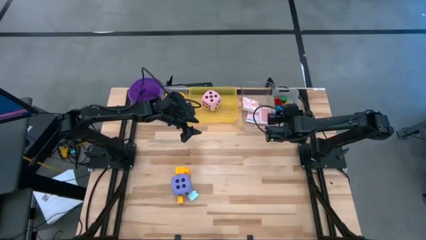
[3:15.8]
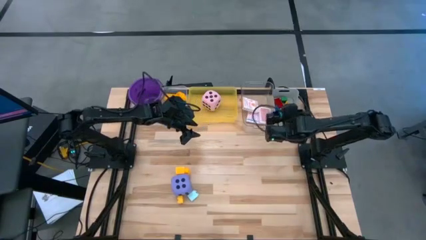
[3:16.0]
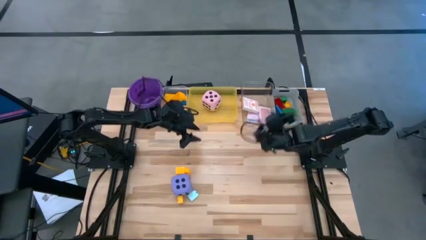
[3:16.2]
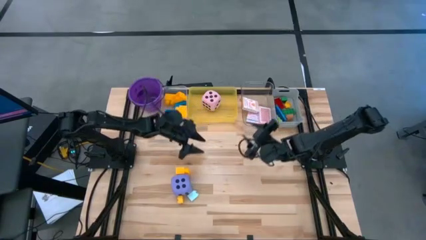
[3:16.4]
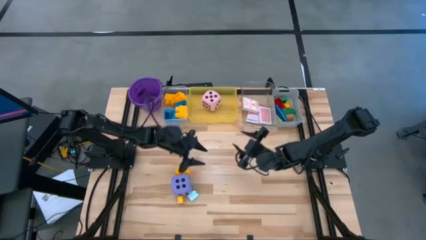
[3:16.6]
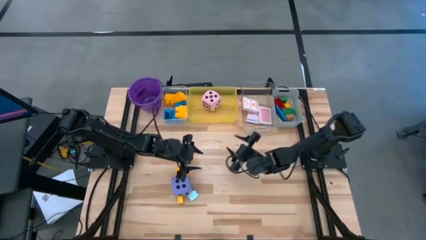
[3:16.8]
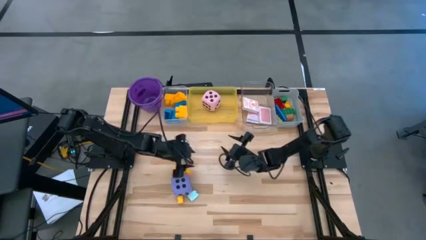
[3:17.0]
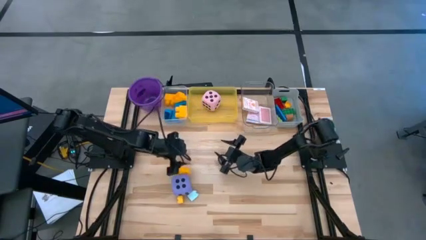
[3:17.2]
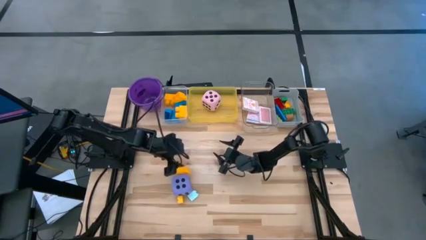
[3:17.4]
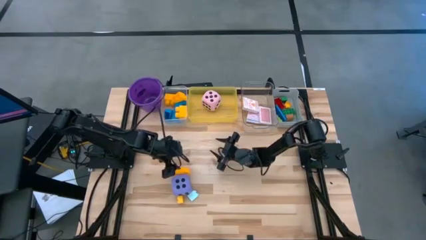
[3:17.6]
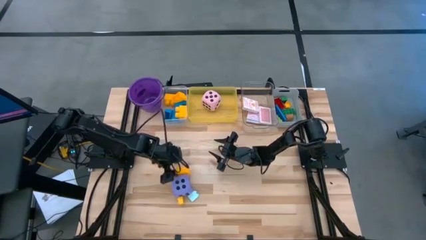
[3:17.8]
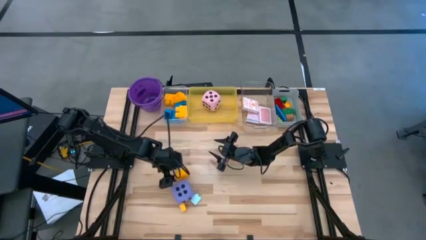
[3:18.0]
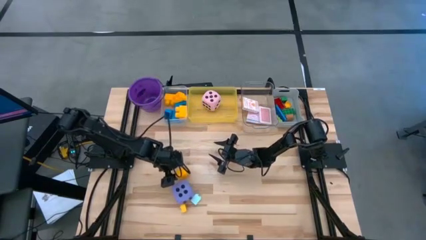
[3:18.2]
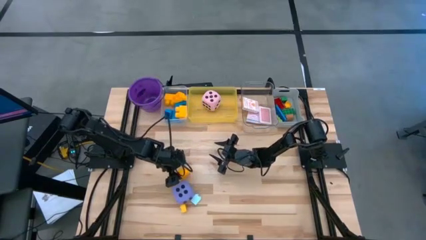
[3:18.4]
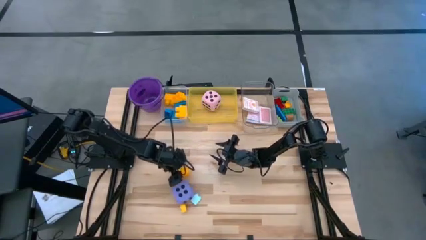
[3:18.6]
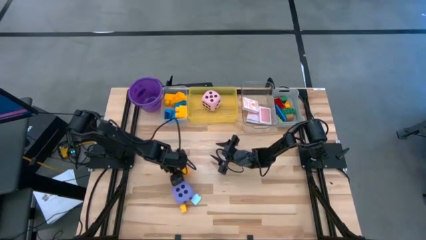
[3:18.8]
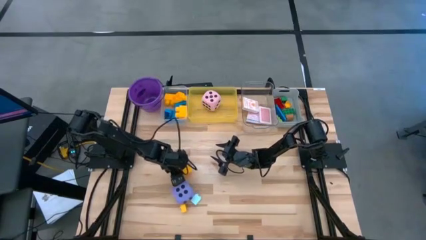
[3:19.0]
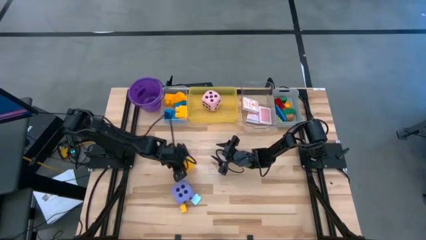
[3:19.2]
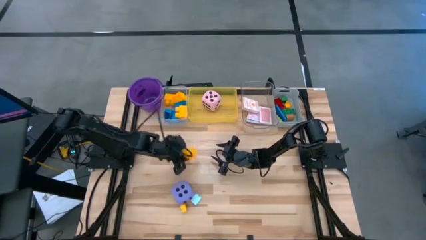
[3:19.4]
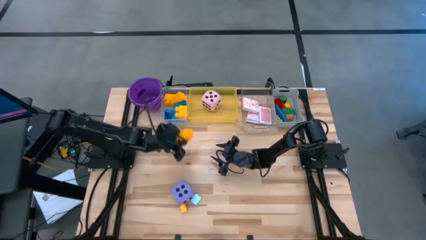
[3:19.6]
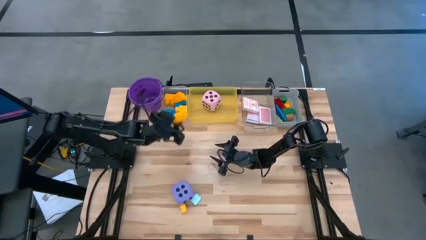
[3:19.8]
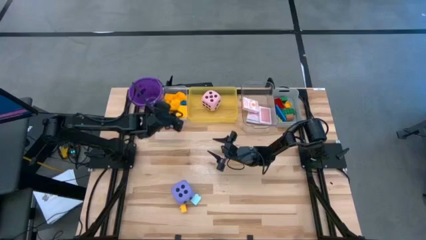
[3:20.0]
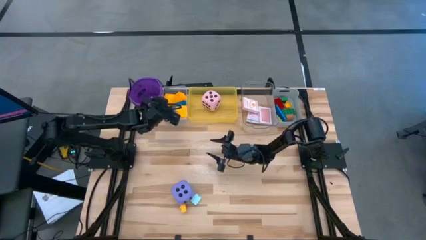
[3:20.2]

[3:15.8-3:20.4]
Task: Pick & Place Toys
Put the large yellow game piece into the white transparent bin

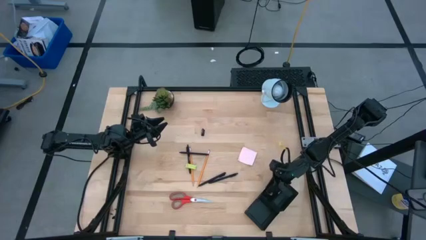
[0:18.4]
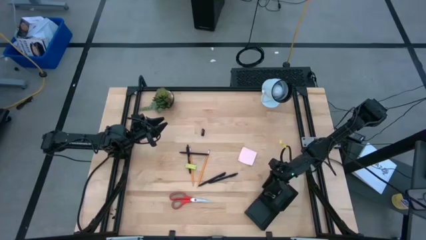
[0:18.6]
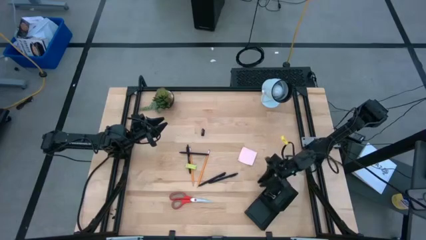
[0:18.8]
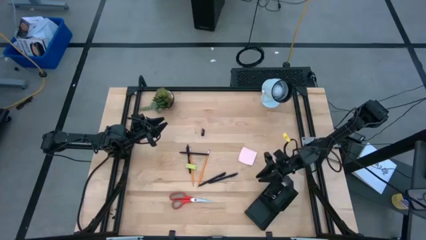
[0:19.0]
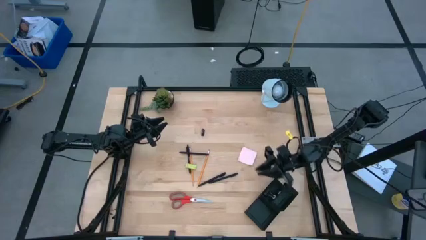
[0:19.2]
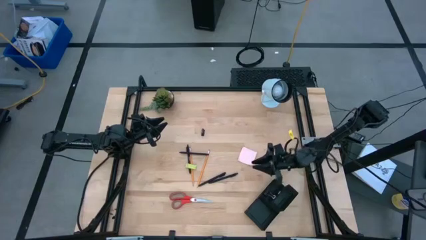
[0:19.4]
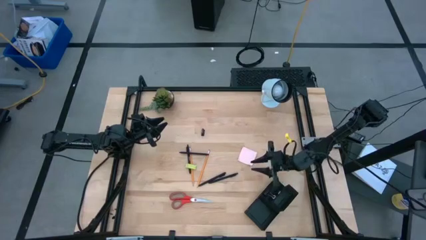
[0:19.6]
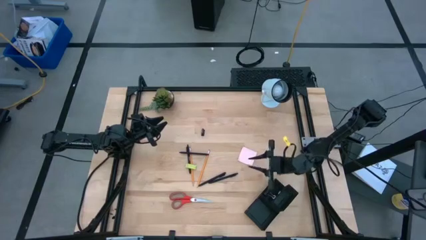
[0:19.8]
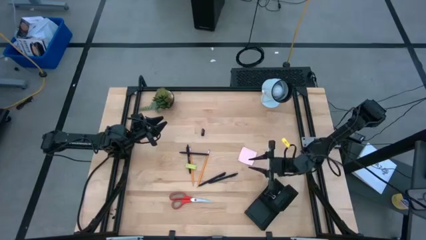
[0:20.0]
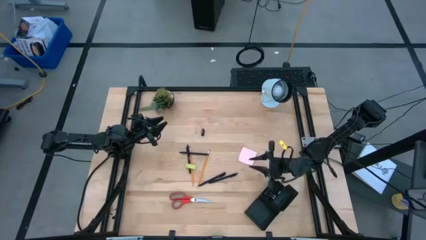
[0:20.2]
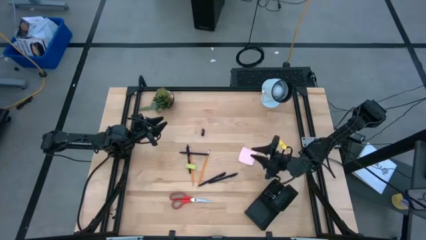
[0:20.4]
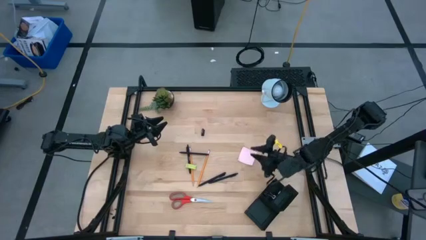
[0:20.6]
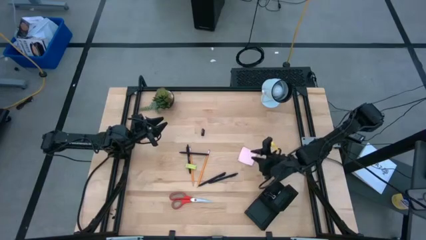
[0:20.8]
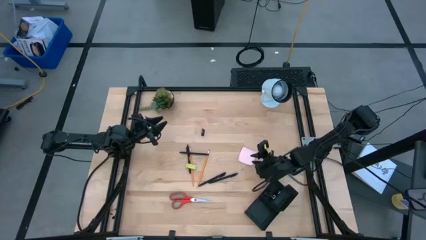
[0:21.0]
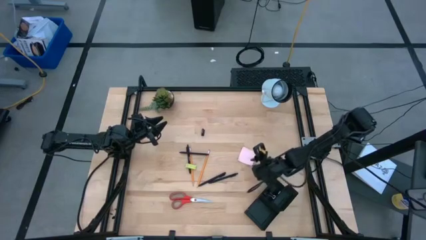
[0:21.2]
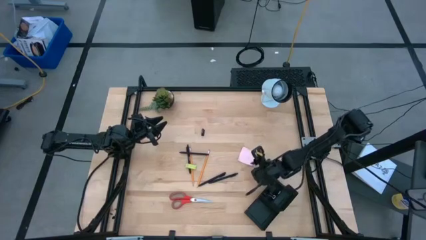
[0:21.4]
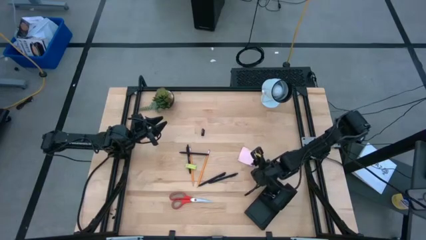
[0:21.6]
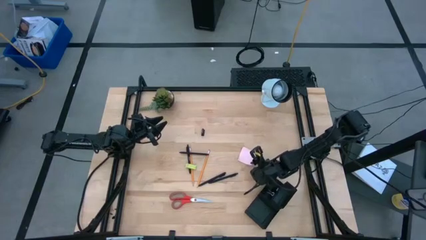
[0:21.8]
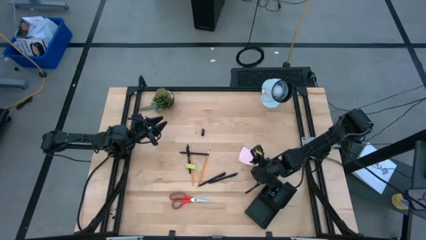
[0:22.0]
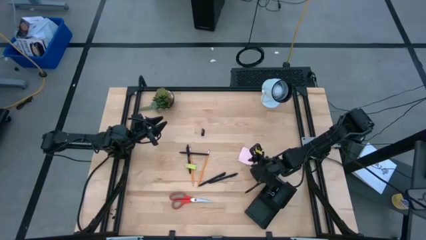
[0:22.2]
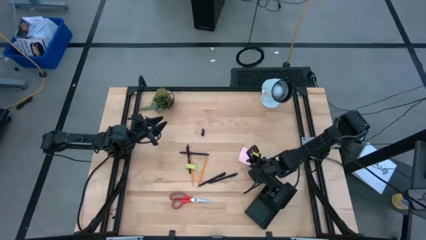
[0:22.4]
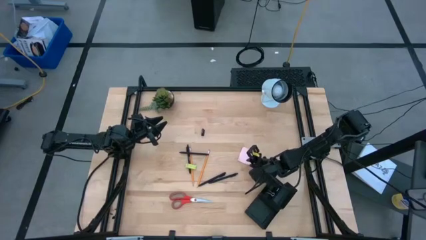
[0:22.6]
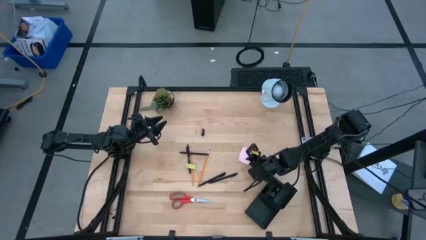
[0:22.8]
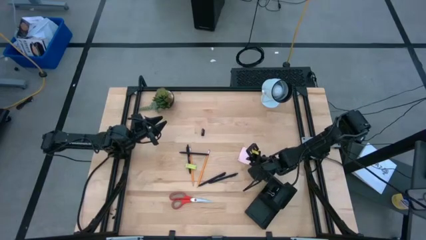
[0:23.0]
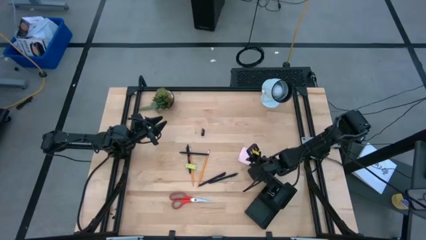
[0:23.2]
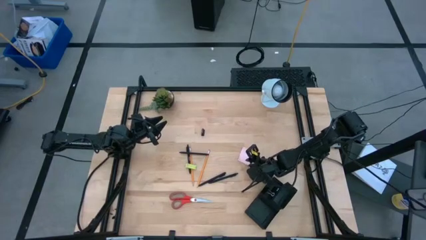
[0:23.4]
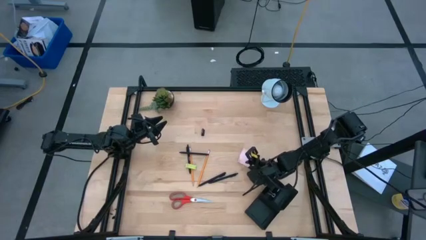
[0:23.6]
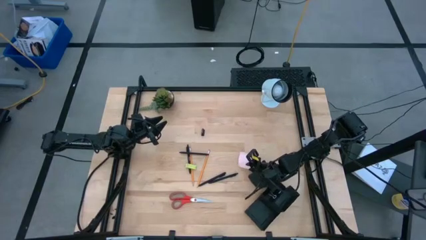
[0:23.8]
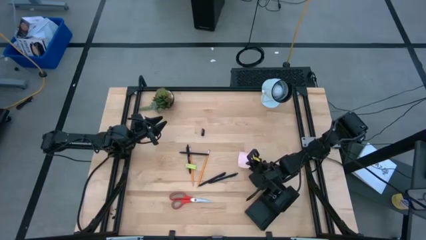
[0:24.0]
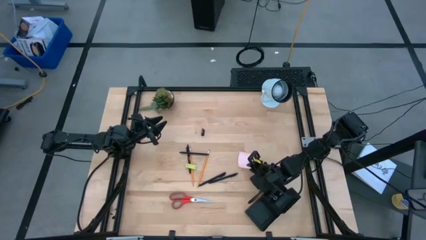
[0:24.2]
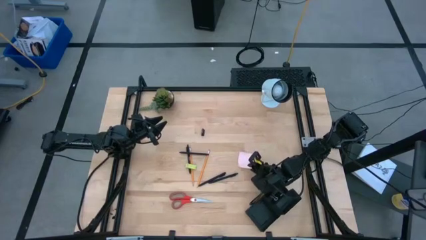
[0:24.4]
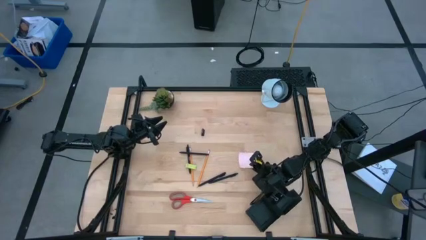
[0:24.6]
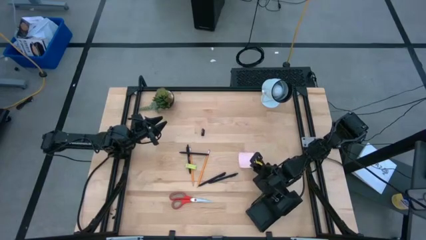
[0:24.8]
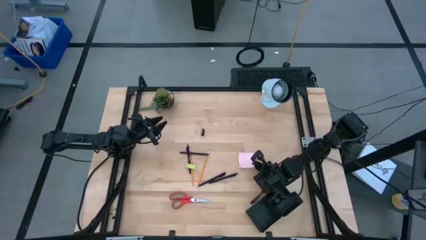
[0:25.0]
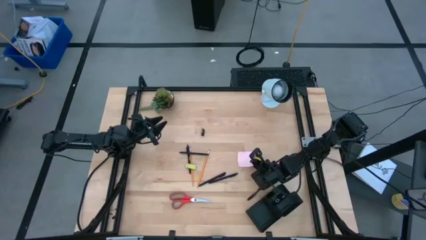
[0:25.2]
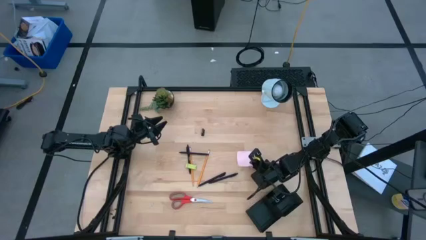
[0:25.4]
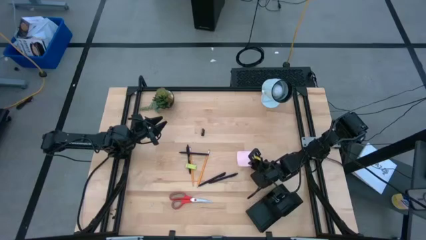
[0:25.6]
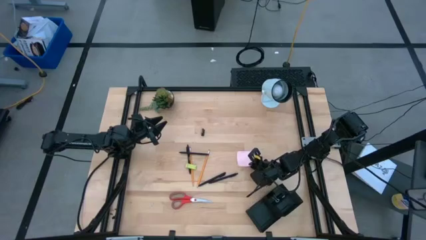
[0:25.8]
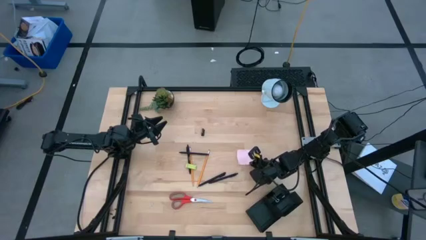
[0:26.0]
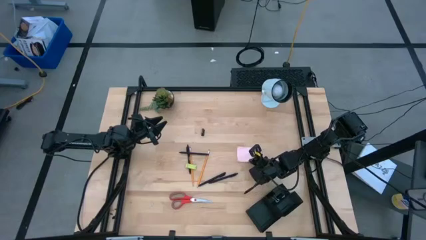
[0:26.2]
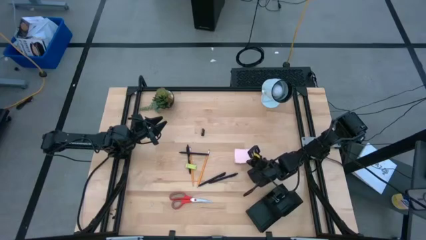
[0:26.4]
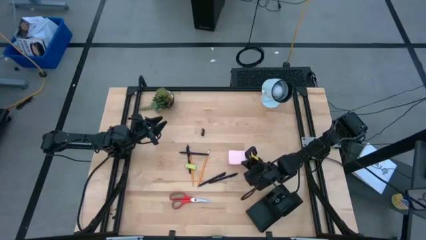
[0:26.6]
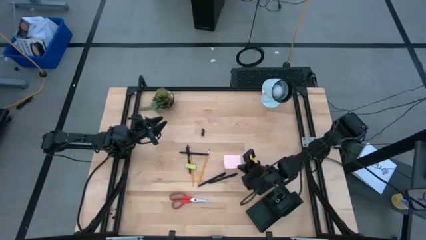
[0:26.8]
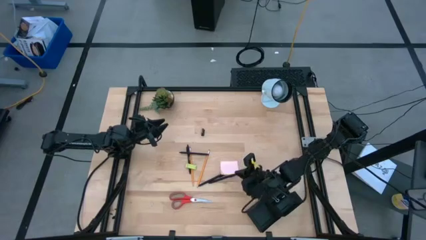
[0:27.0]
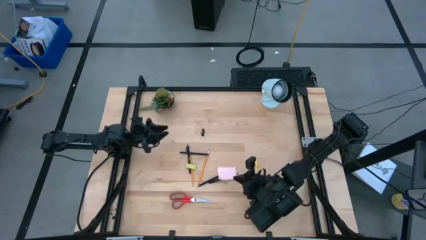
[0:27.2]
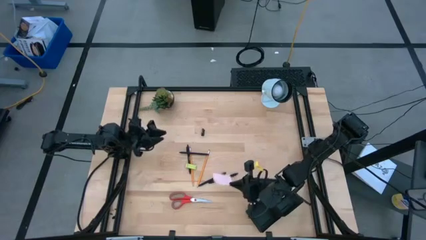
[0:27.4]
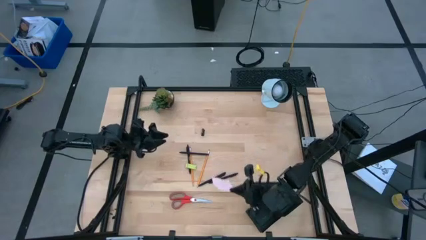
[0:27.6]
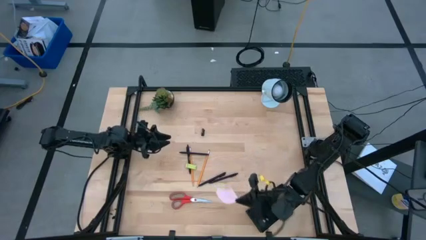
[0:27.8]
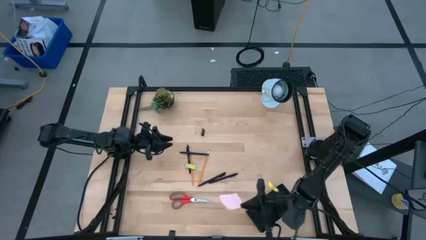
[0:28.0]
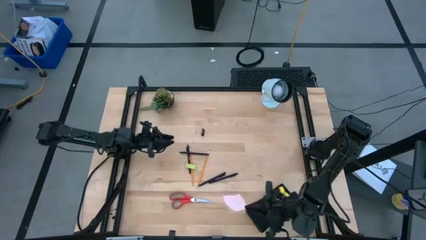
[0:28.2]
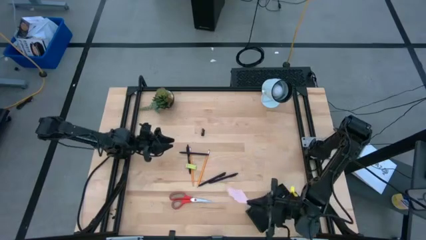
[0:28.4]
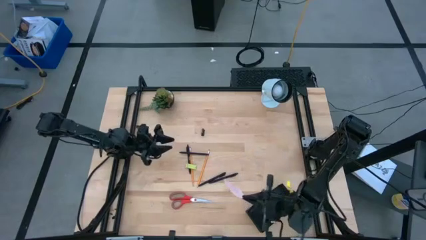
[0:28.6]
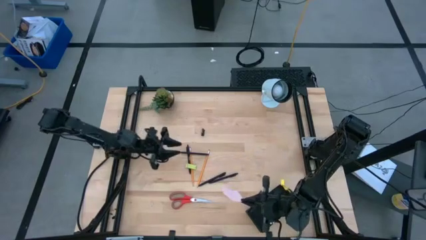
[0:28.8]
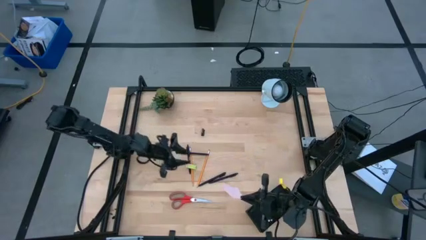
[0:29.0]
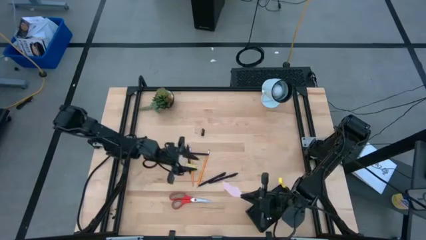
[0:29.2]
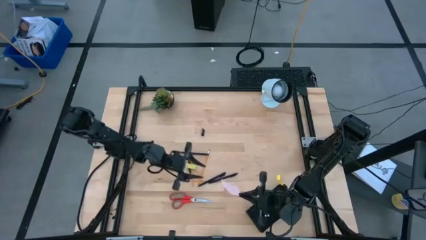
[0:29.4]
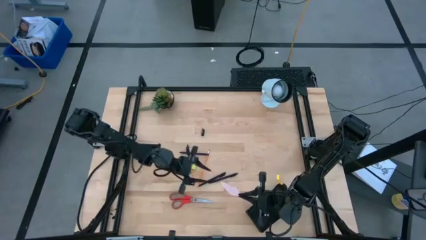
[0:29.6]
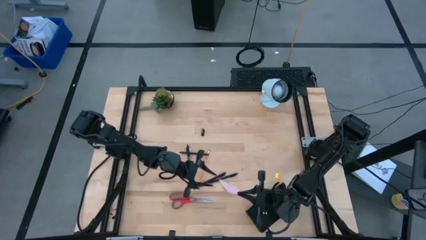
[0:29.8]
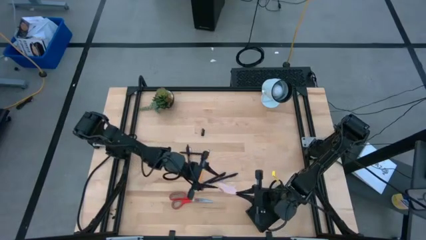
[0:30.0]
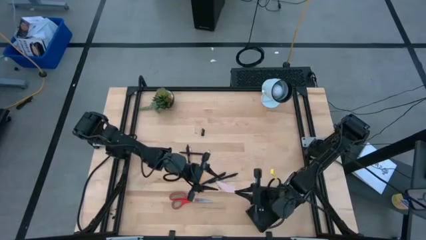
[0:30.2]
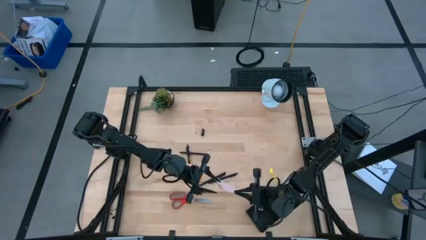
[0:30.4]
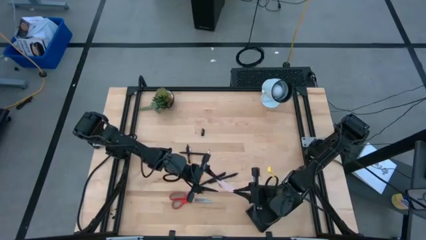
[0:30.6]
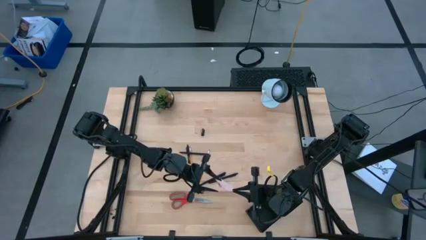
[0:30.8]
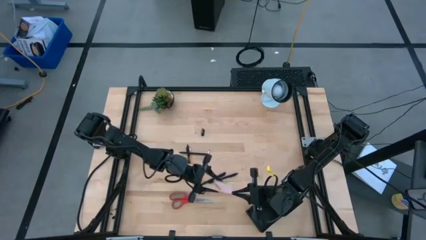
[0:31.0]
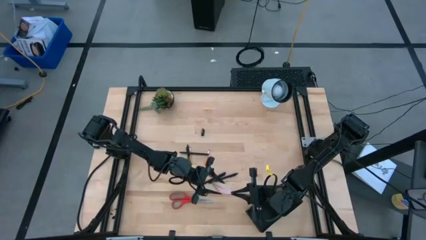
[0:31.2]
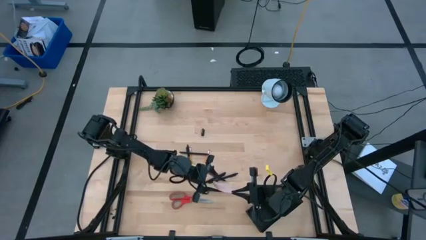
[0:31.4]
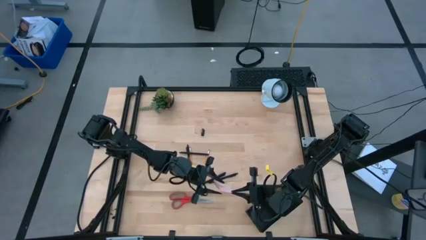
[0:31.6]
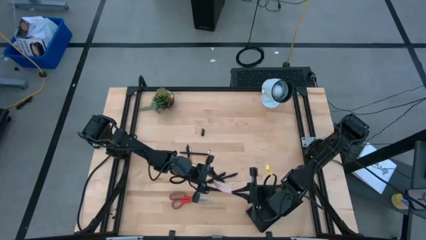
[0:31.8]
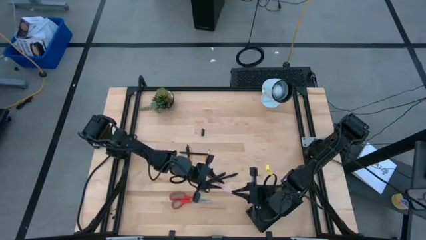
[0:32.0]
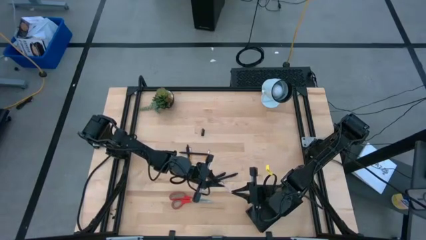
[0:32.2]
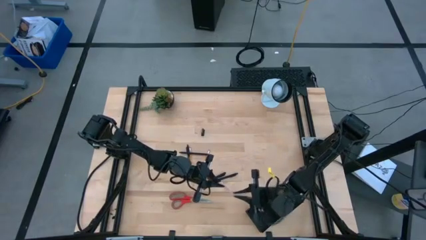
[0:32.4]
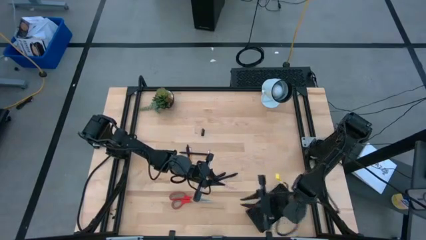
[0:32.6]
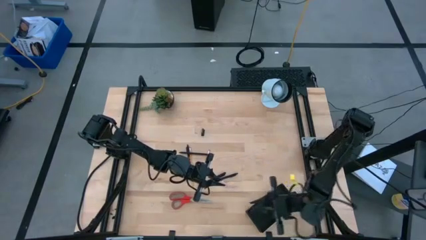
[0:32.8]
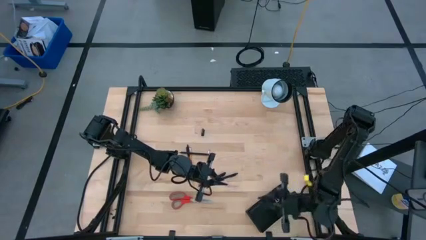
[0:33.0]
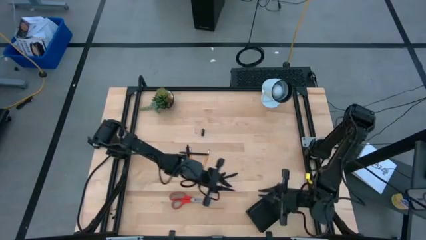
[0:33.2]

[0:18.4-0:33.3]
Task: Pick and place office supplies into organizer
Put the pink sticky note into the desk organizer
